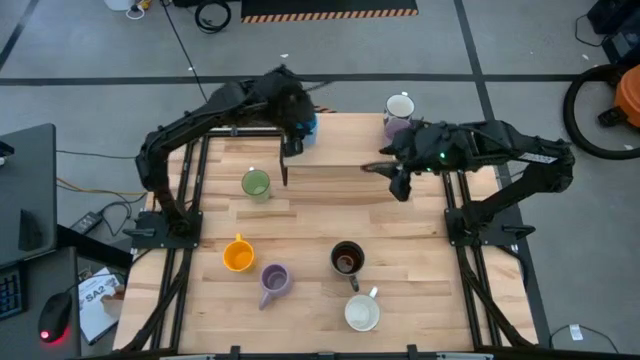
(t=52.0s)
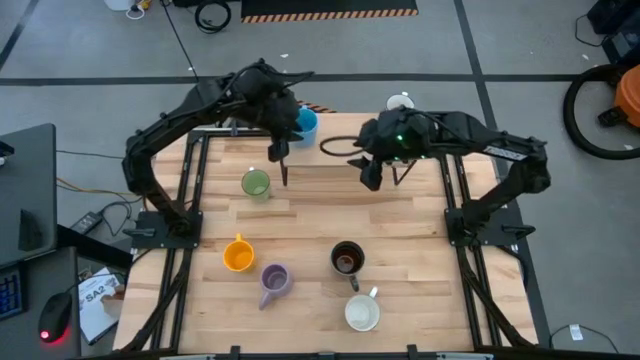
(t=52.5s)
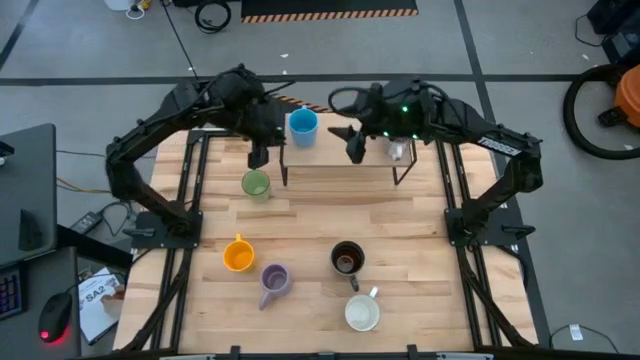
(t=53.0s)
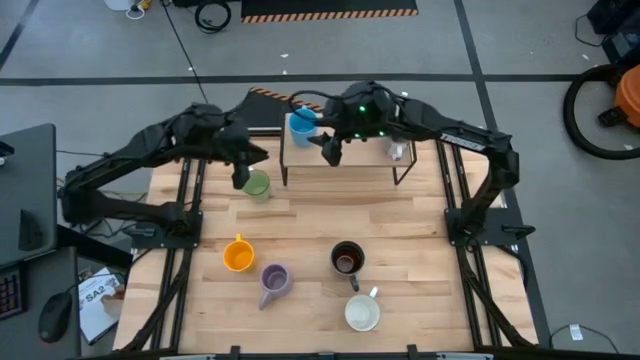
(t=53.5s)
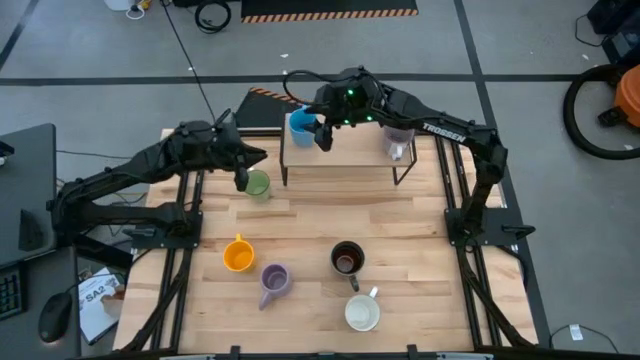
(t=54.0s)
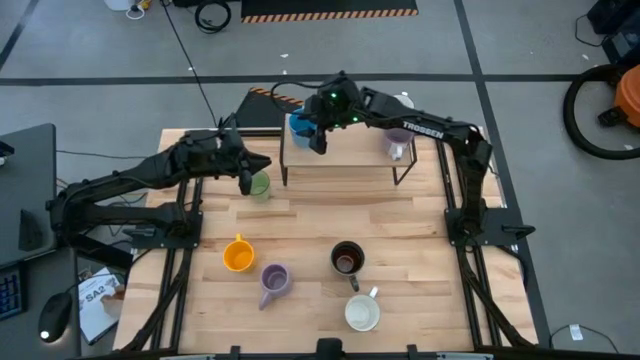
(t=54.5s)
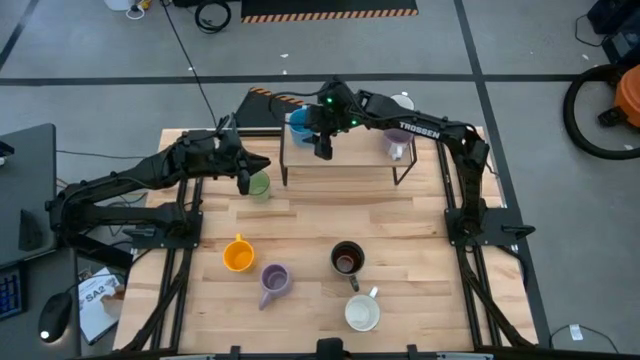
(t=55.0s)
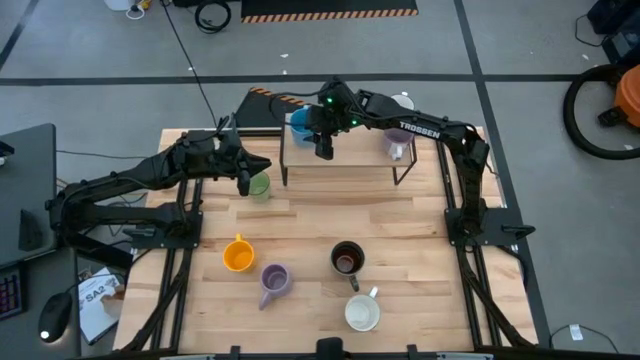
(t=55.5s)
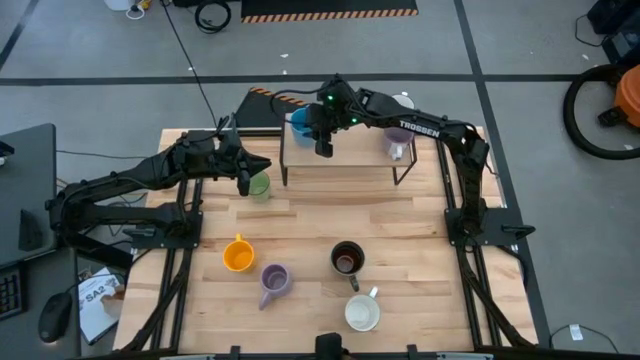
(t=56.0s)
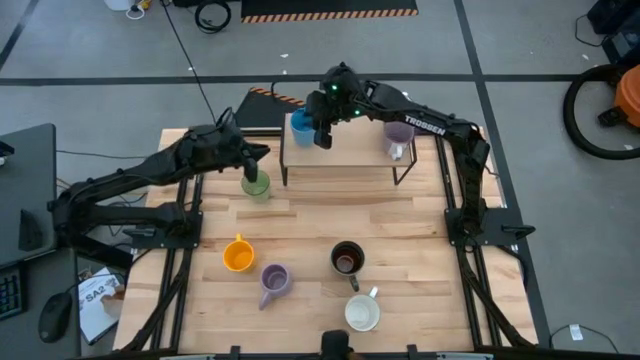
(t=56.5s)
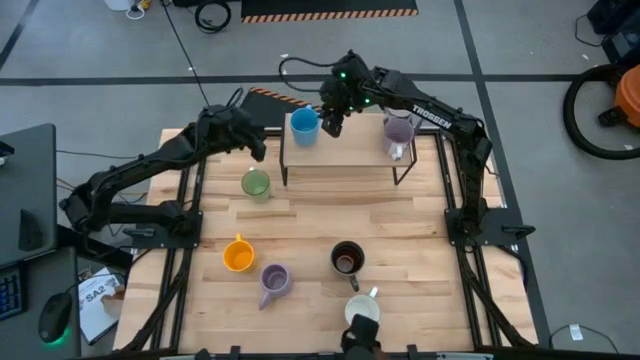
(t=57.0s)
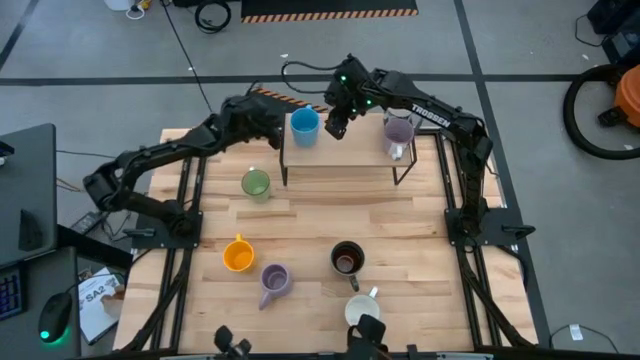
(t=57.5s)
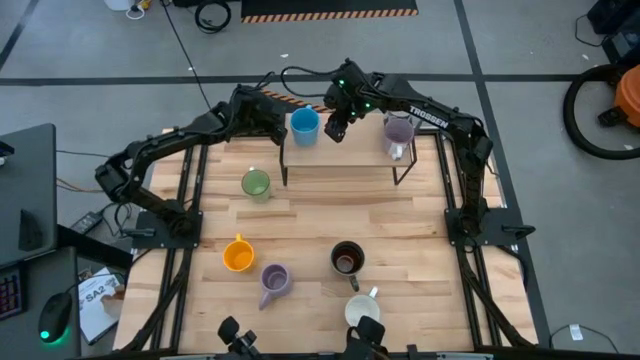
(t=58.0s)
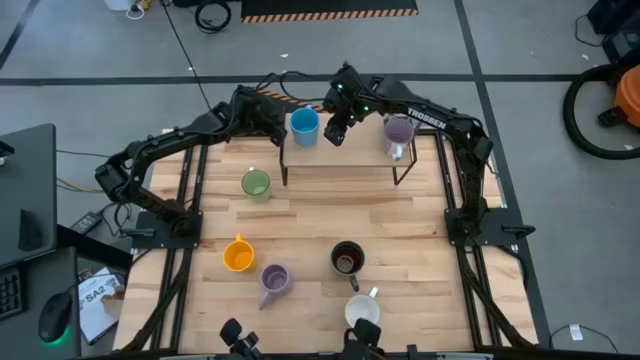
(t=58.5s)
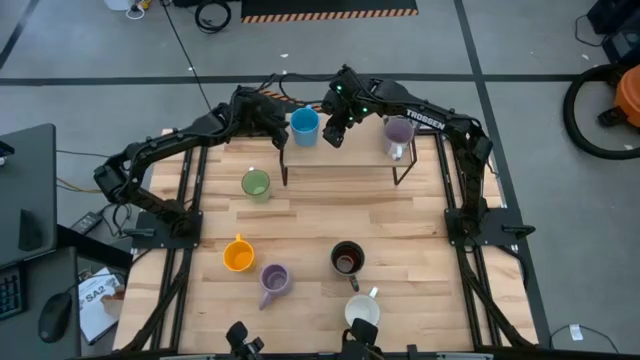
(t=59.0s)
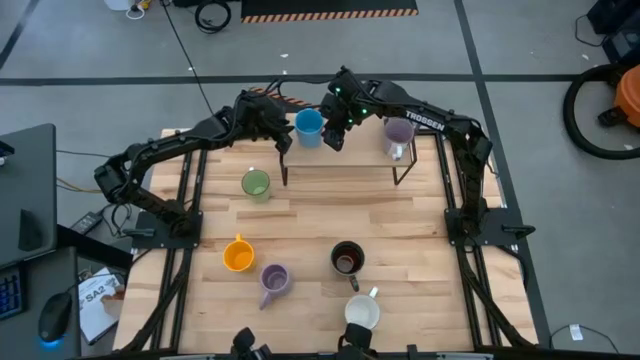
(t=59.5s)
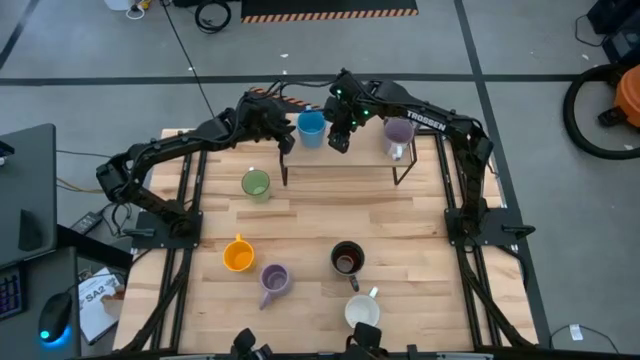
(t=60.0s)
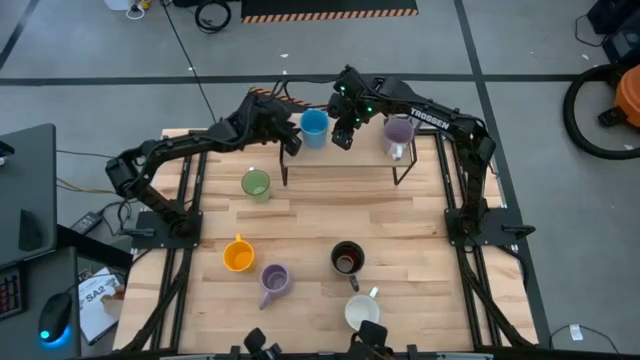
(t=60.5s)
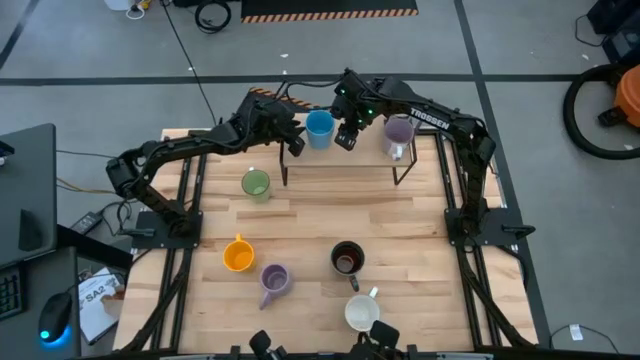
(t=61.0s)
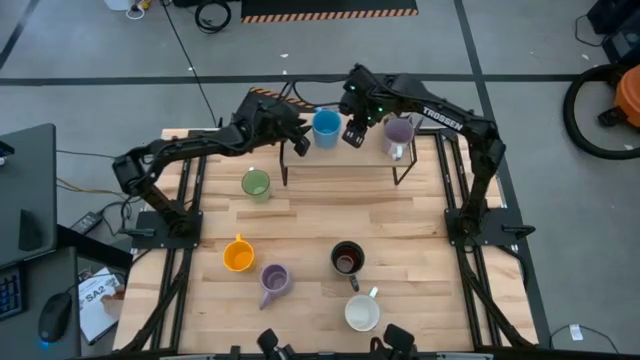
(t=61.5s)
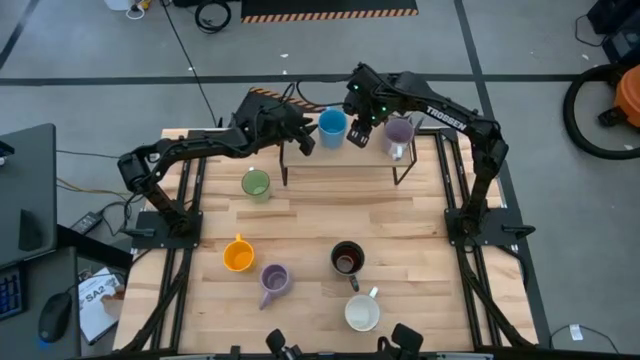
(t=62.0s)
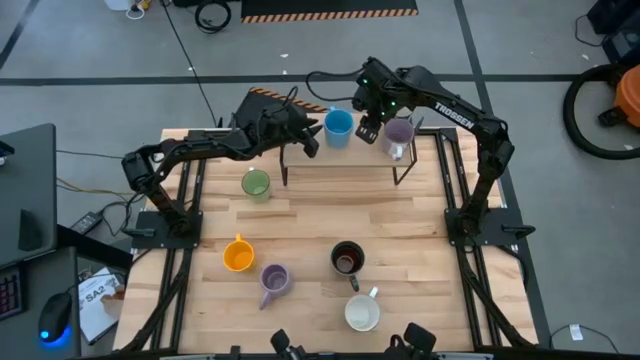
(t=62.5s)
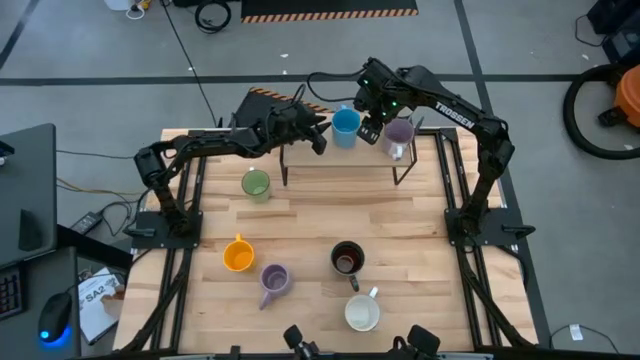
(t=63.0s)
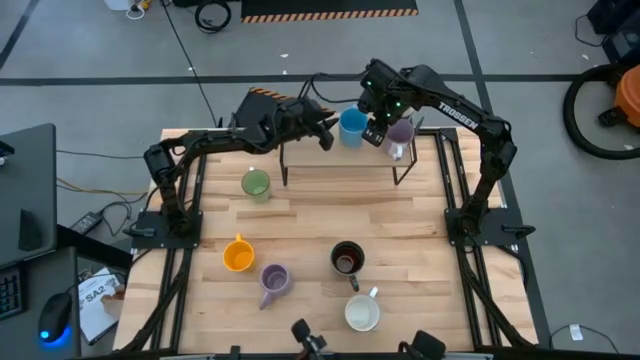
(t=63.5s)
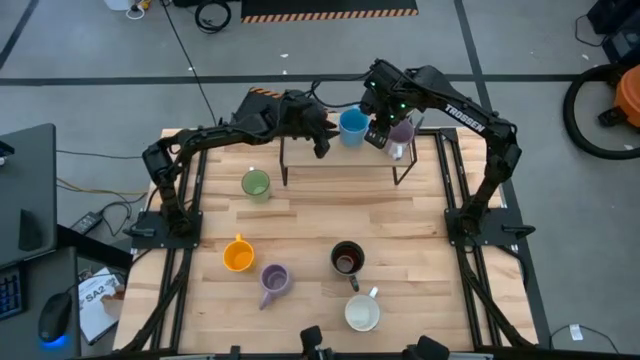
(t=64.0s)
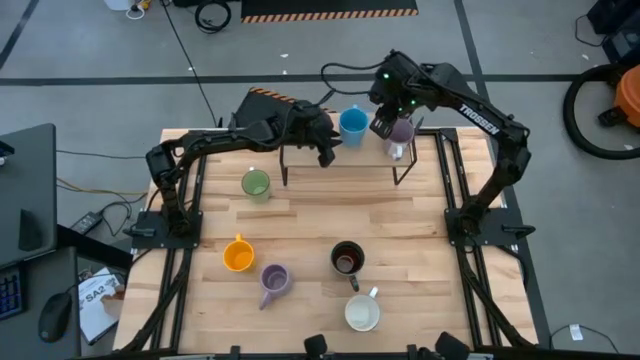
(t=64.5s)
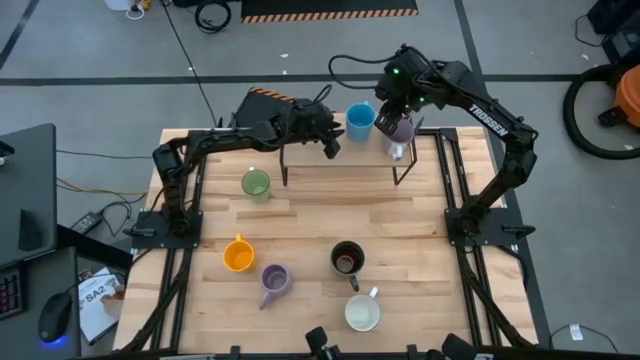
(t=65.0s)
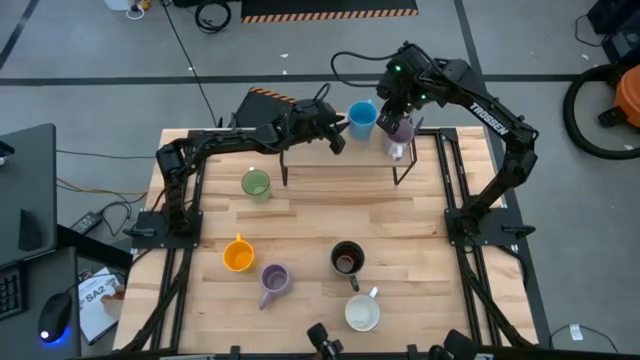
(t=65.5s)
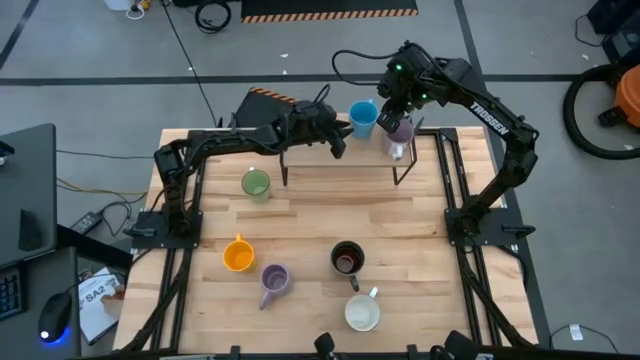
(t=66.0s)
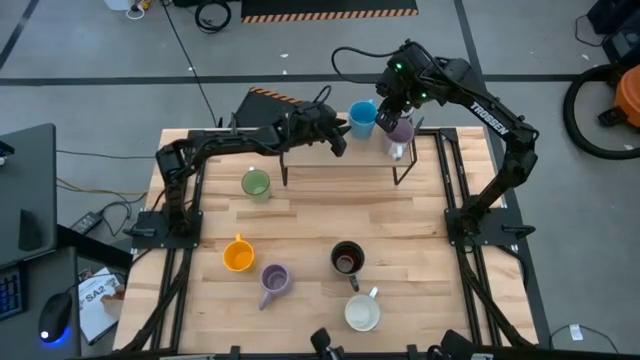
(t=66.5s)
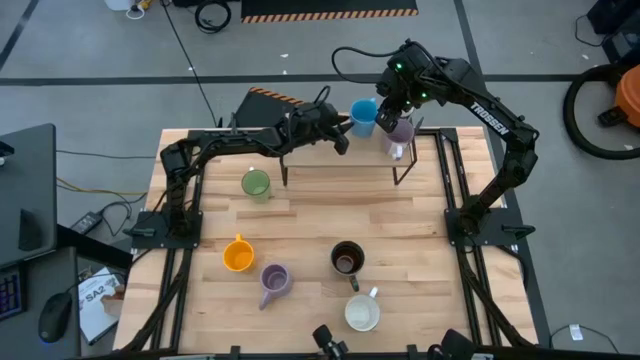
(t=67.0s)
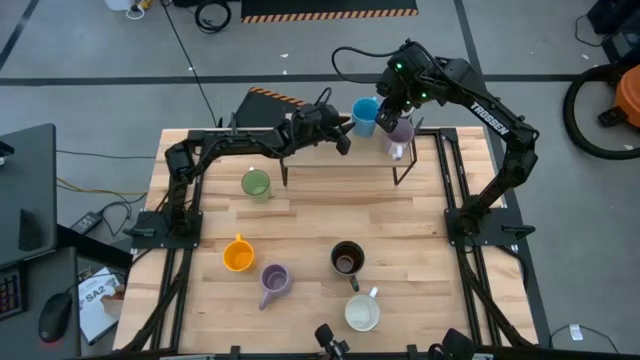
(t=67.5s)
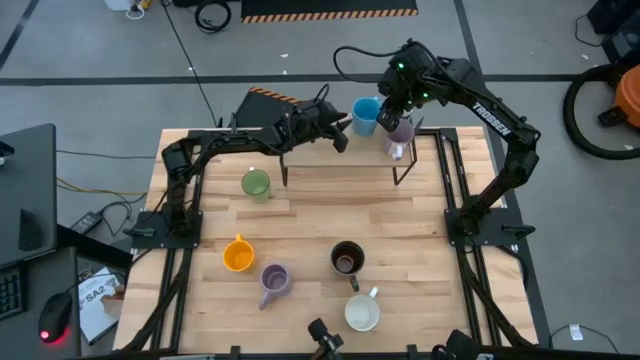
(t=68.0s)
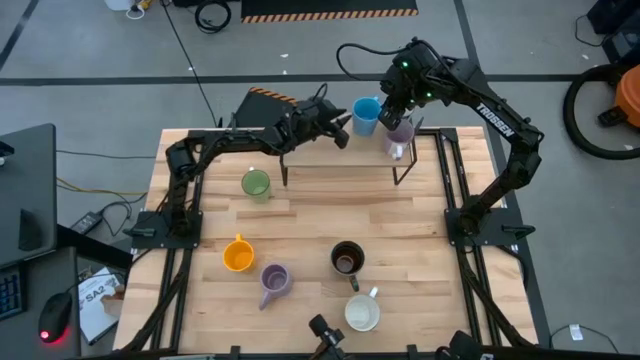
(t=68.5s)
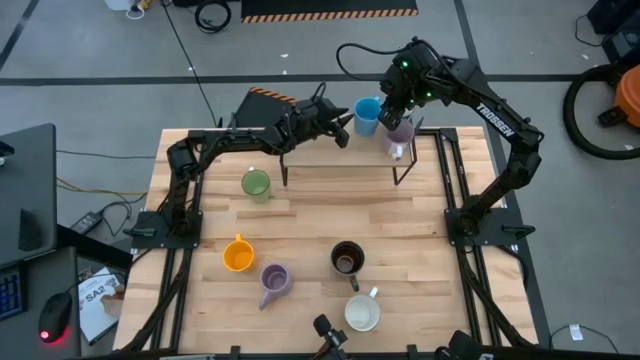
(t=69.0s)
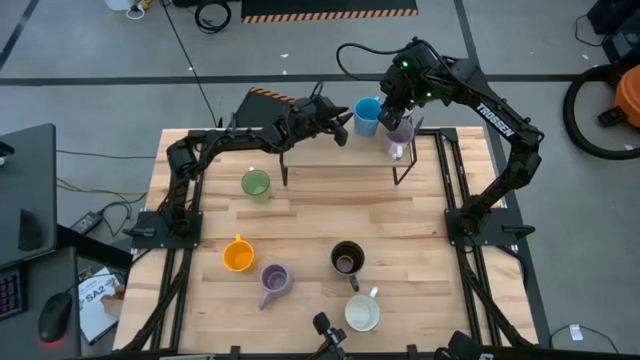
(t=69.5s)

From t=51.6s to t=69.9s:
Task: Place coffee mugs
Put the light blue mug on the shelf

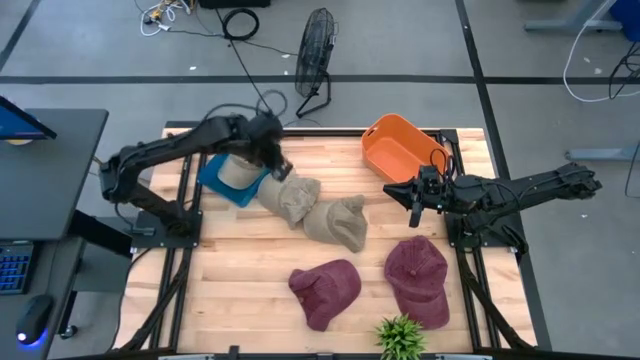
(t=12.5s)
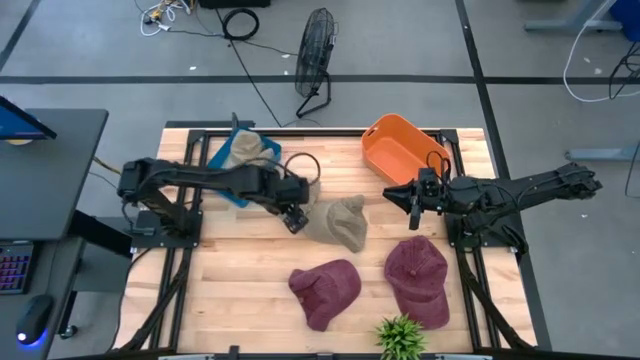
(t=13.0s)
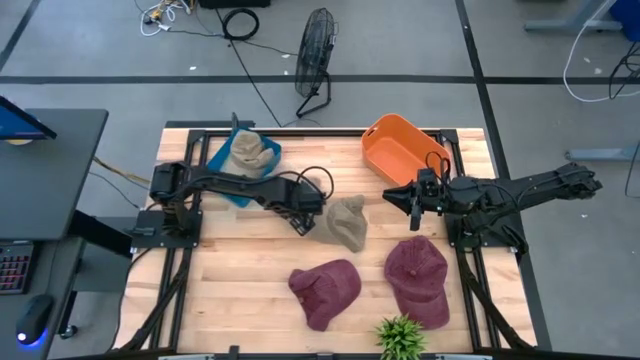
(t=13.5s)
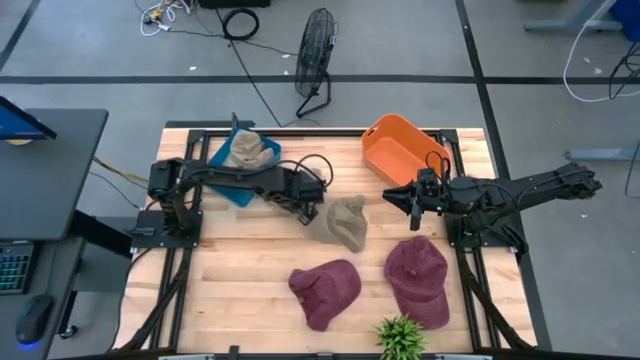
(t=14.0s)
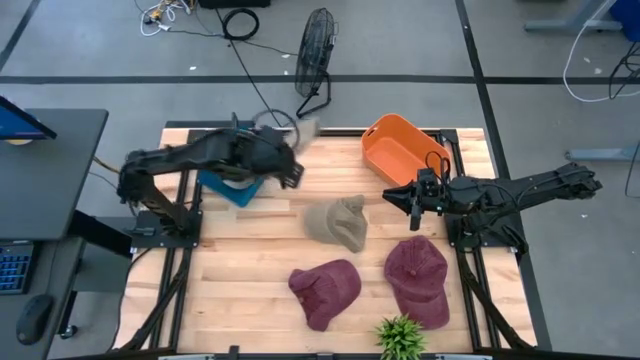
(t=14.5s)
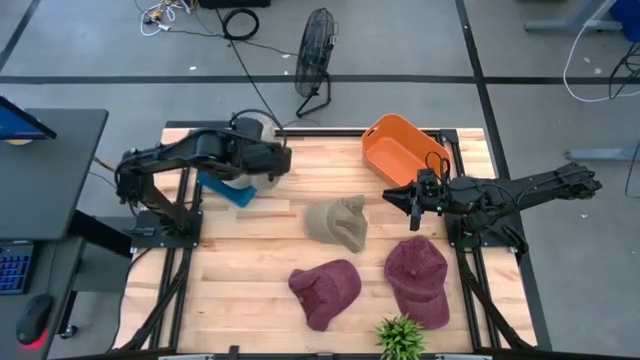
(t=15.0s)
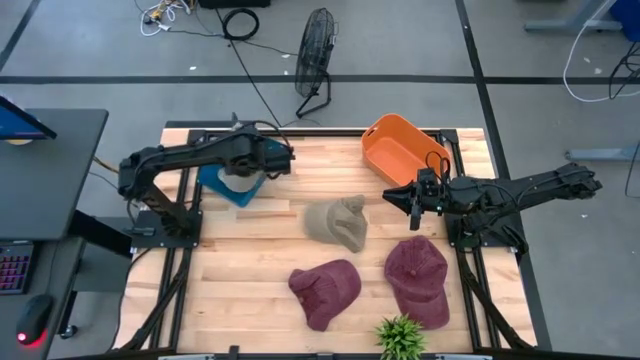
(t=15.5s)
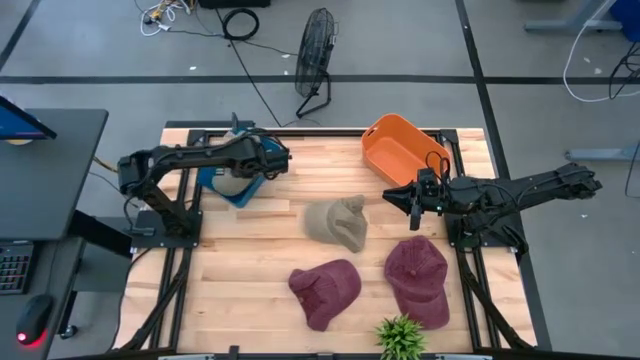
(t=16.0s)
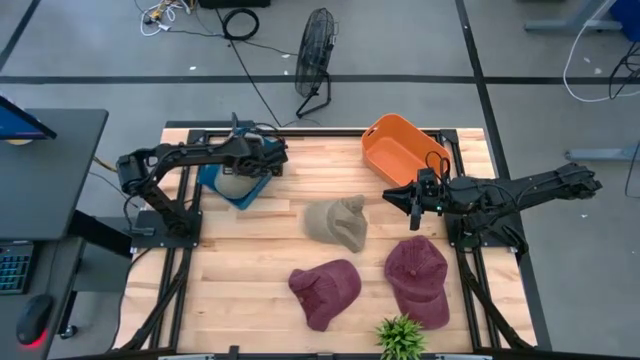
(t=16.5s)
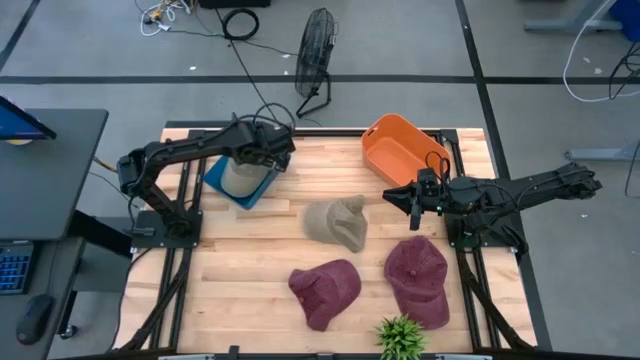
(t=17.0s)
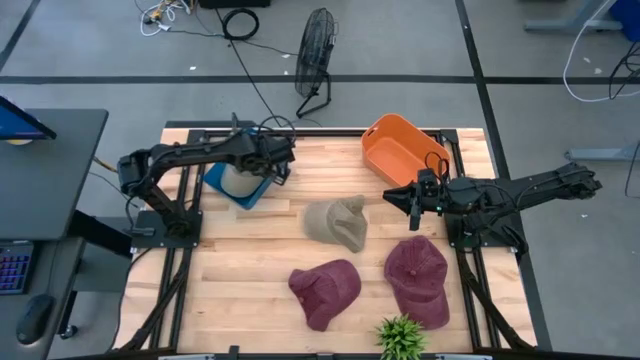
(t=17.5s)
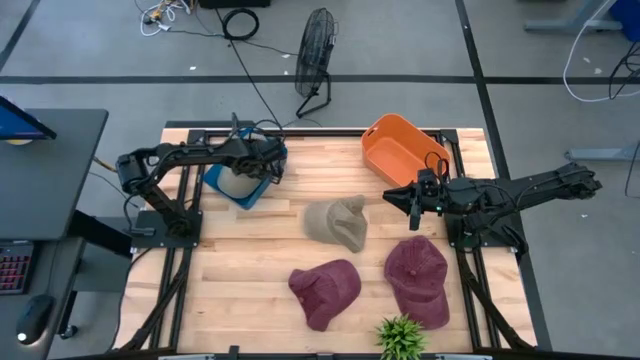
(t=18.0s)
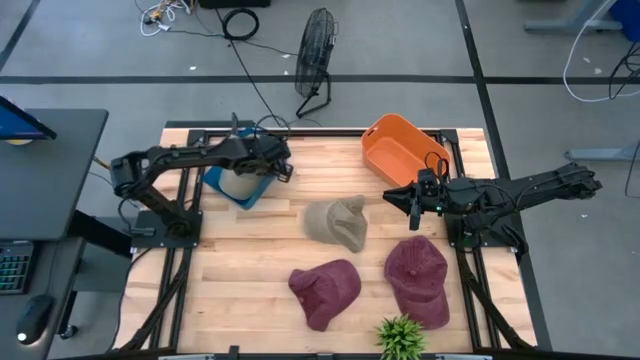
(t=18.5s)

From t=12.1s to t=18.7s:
Task: Pick & Place hat
Put the left brown cap into the blue bin
